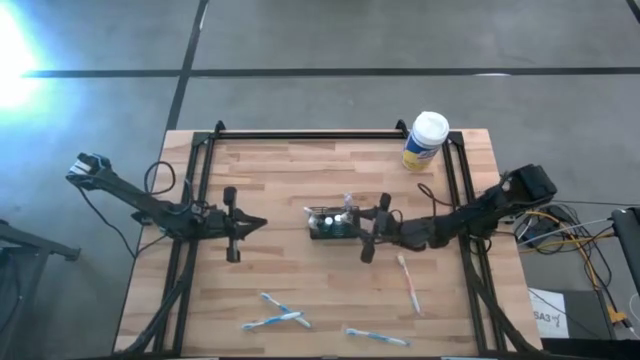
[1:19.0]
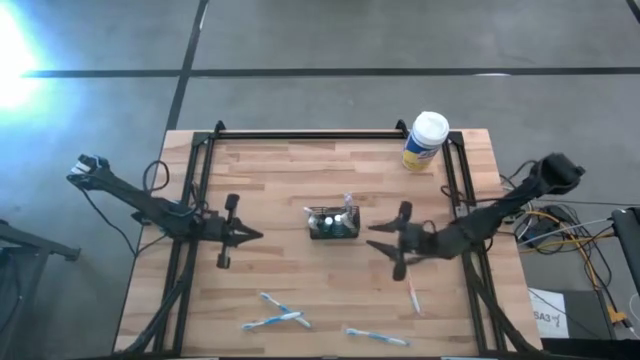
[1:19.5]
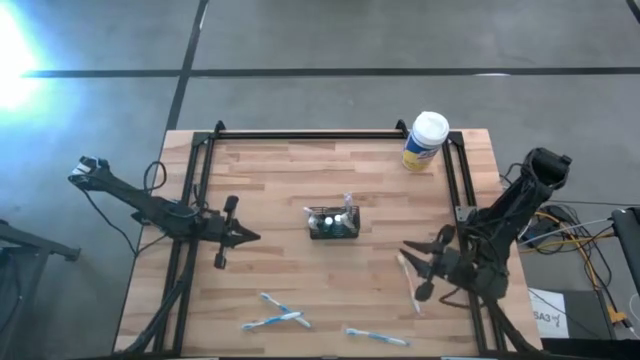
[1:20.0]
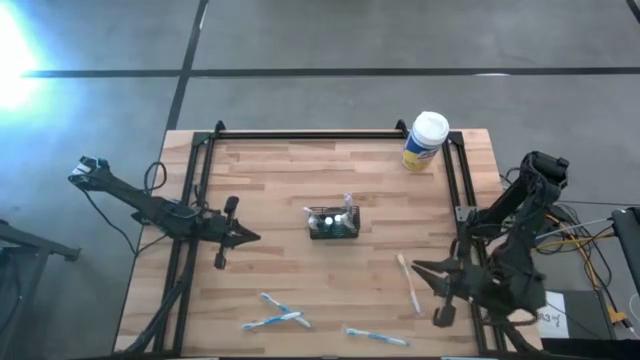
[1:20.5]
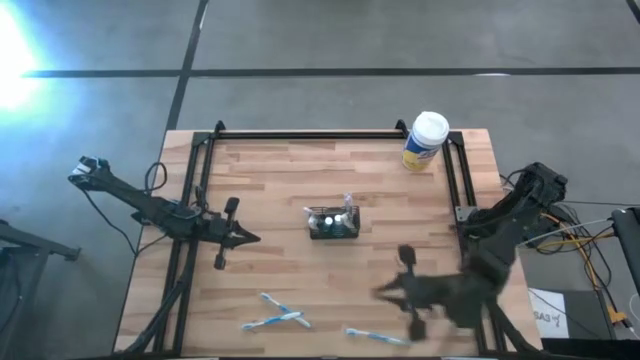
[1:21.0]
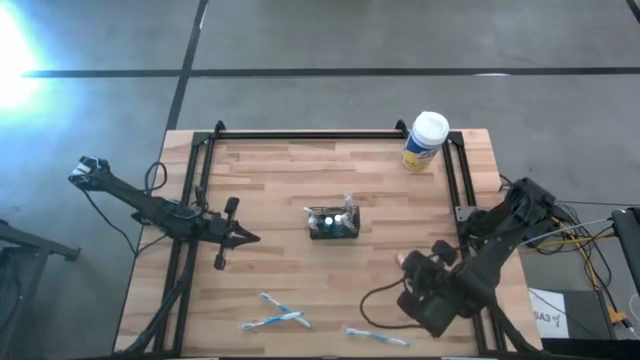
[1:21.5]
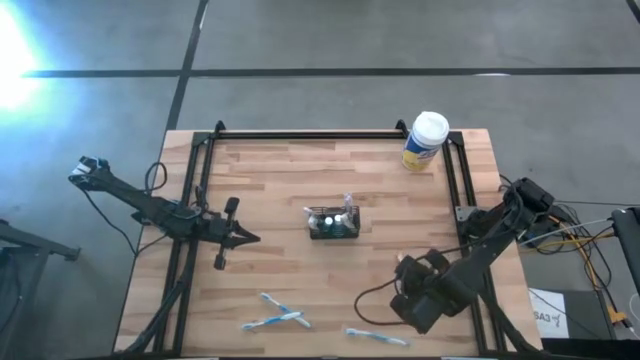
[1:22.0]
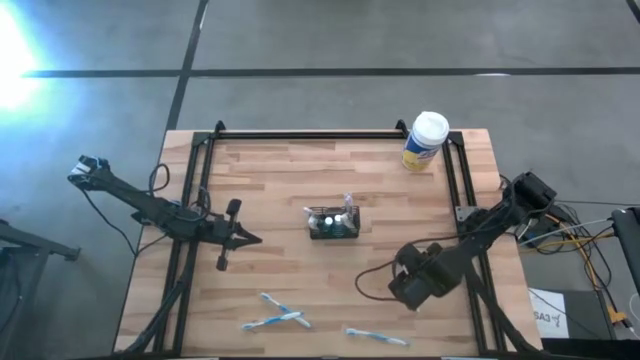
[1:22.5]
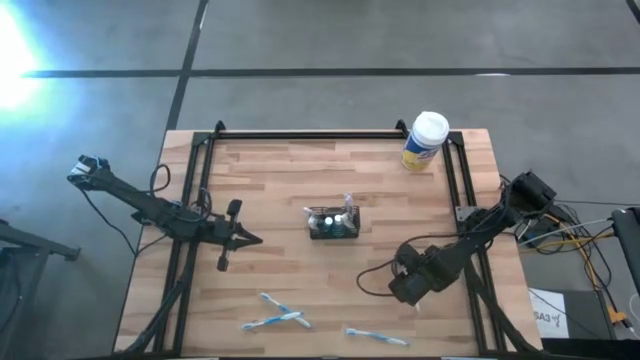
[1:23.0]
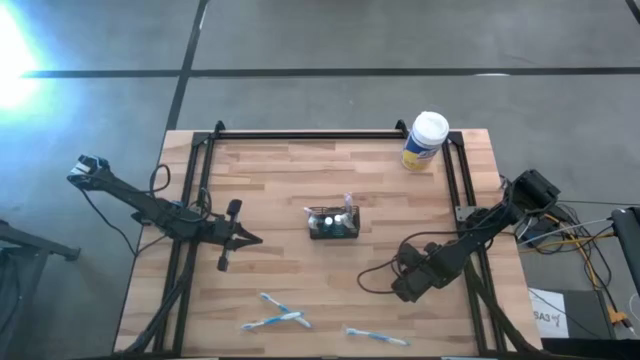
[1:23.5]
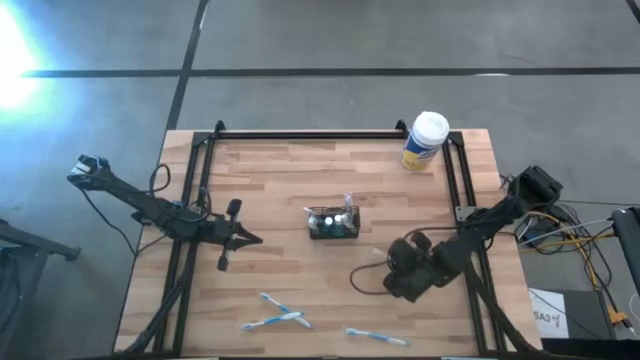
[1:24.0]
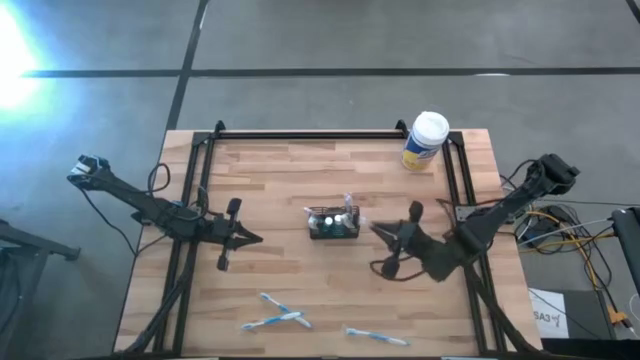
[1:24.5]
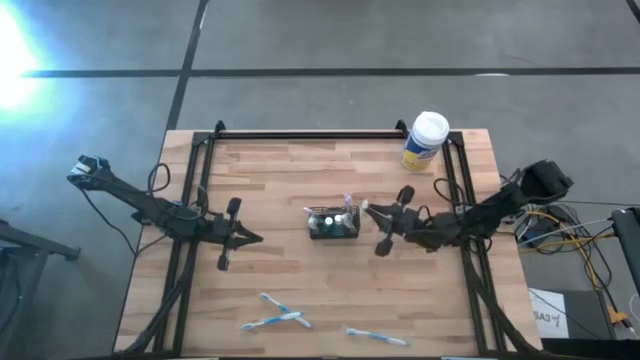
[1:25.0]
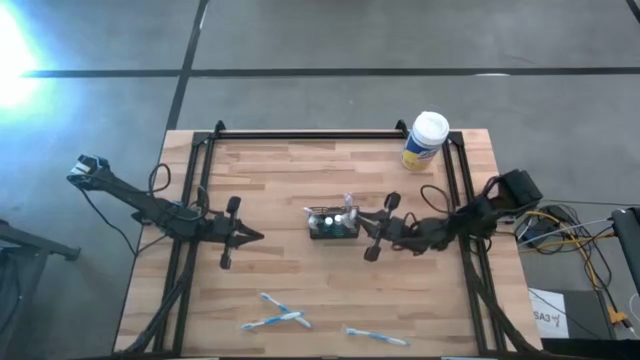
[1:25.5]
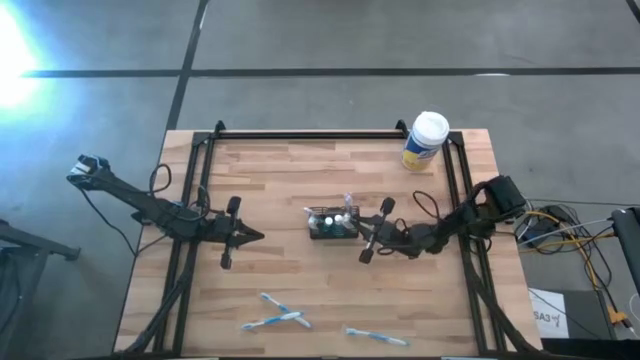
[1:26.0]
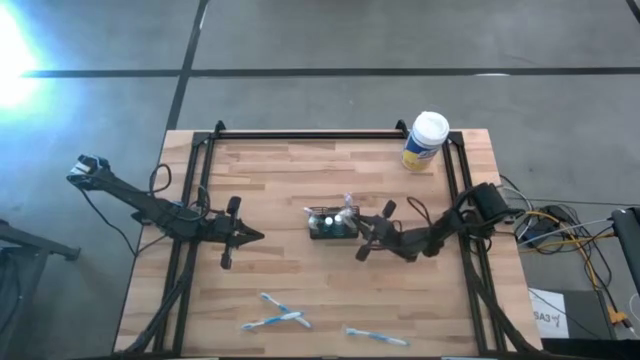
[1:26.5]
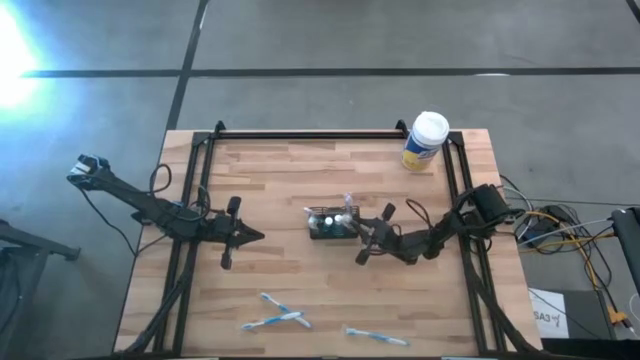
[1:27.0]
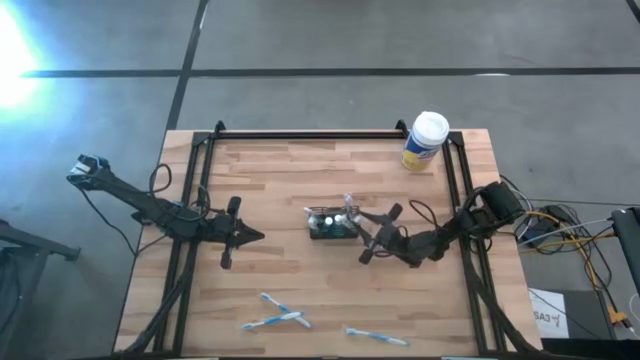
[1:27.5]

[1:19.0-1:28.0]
Task: Pick & Place toothbrushing station
Put the orange toothbrush into the black organizer

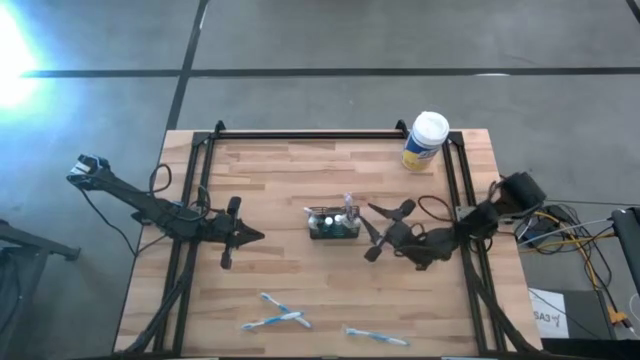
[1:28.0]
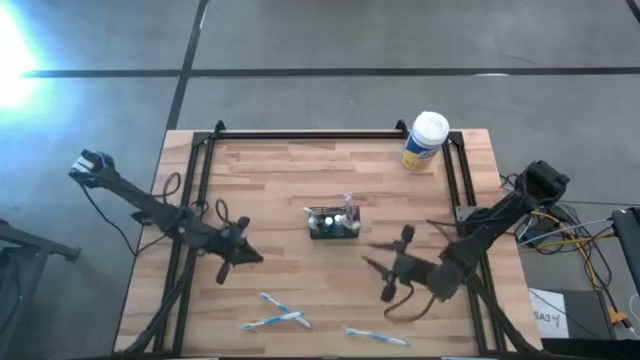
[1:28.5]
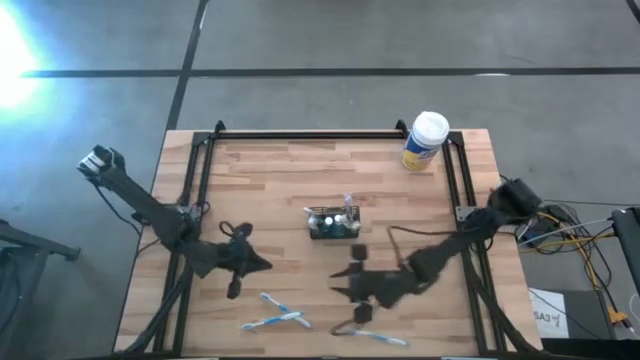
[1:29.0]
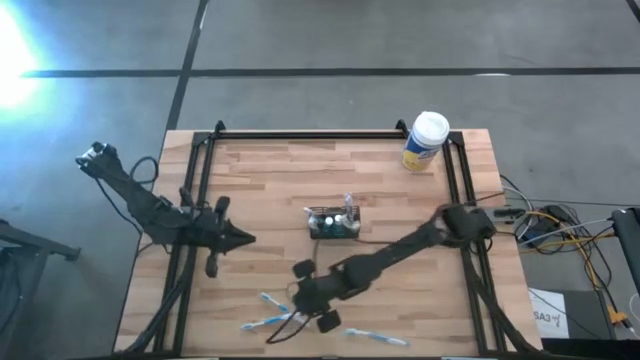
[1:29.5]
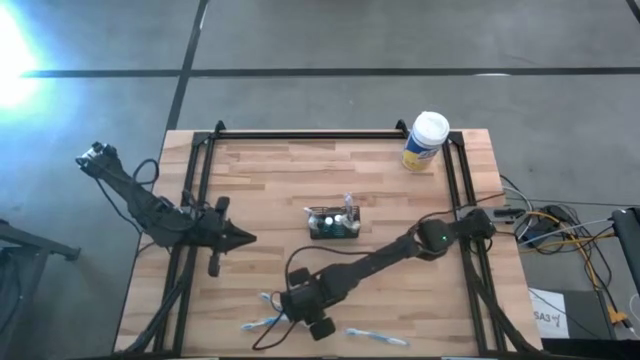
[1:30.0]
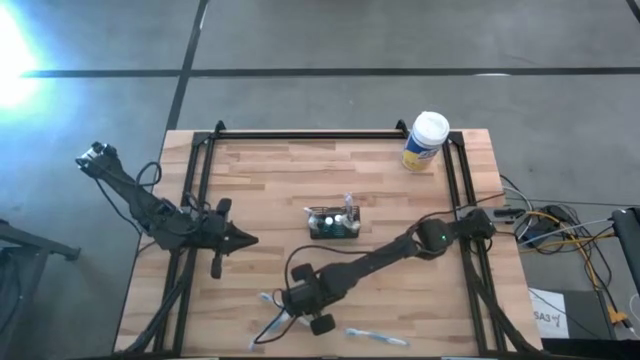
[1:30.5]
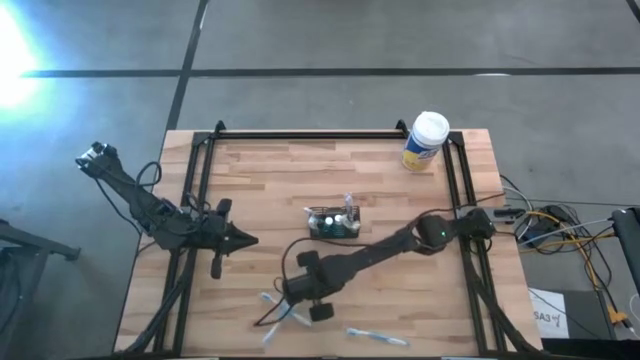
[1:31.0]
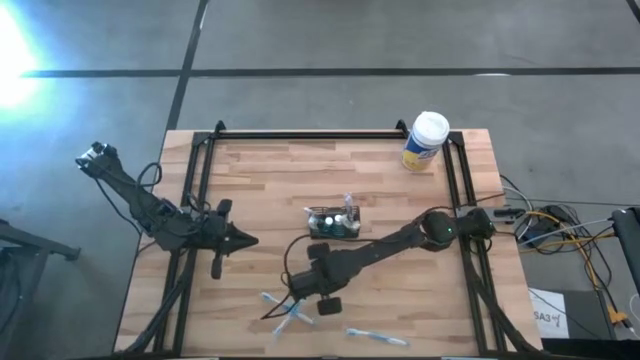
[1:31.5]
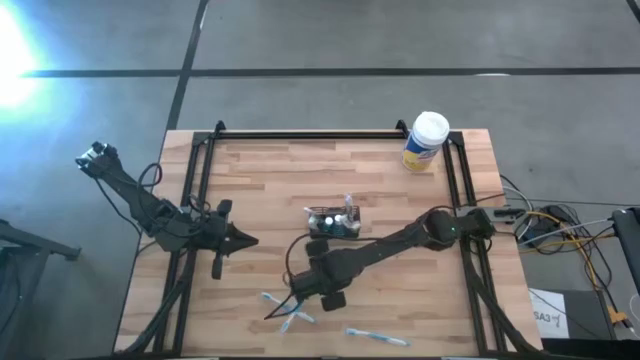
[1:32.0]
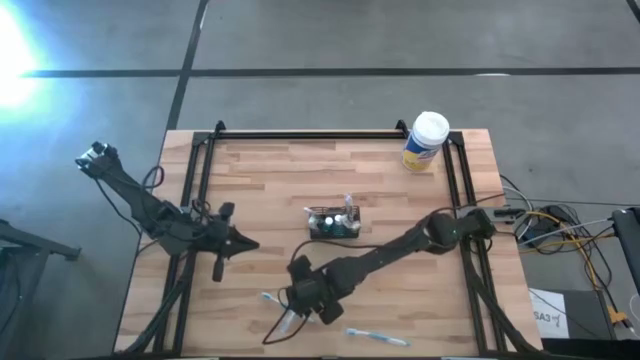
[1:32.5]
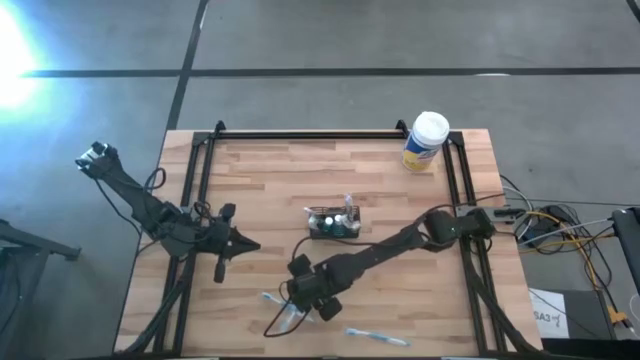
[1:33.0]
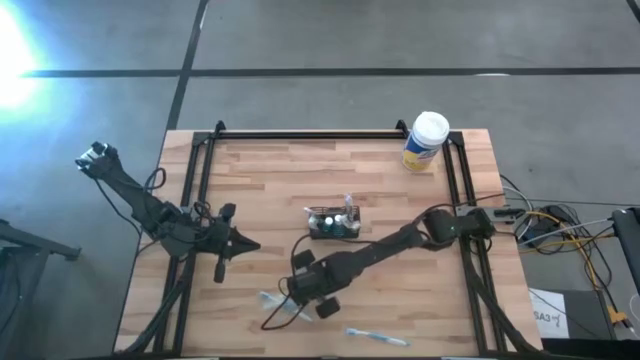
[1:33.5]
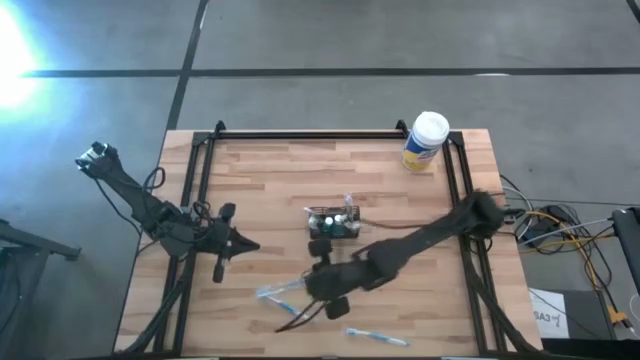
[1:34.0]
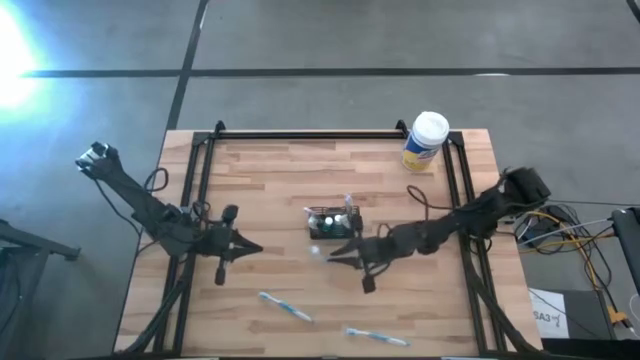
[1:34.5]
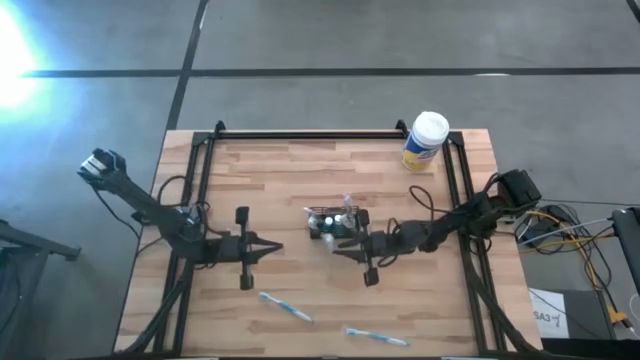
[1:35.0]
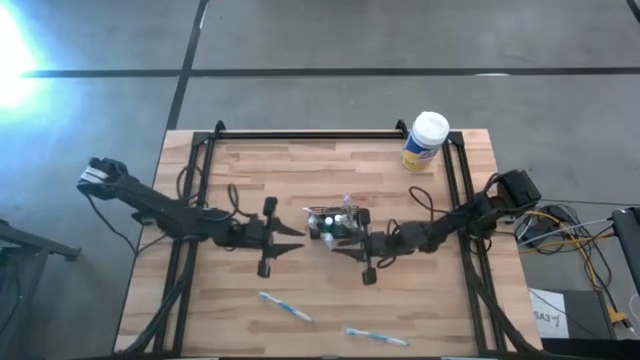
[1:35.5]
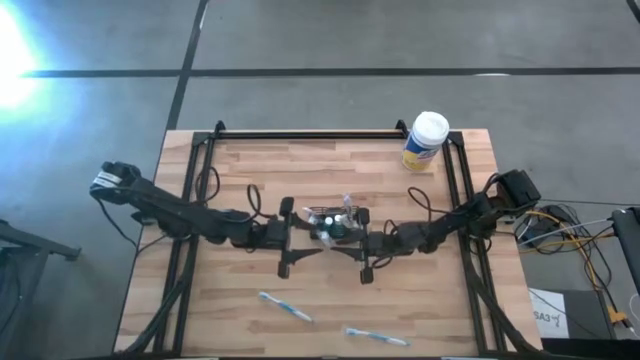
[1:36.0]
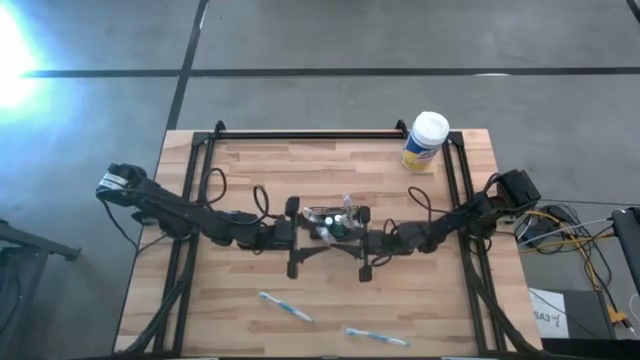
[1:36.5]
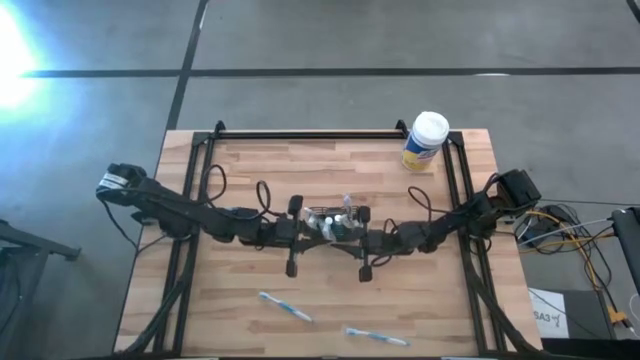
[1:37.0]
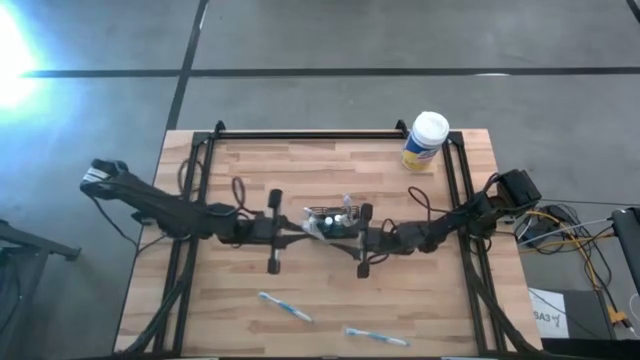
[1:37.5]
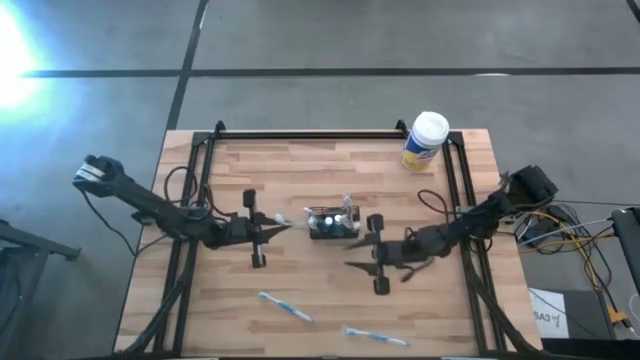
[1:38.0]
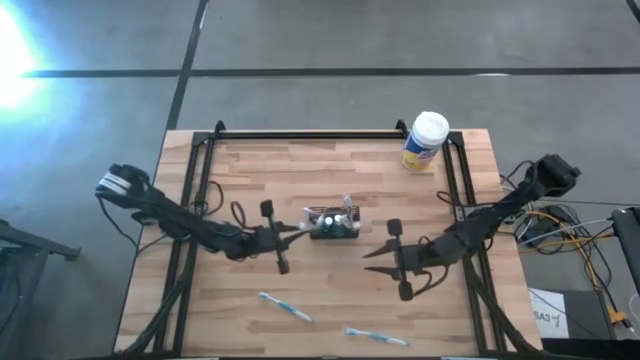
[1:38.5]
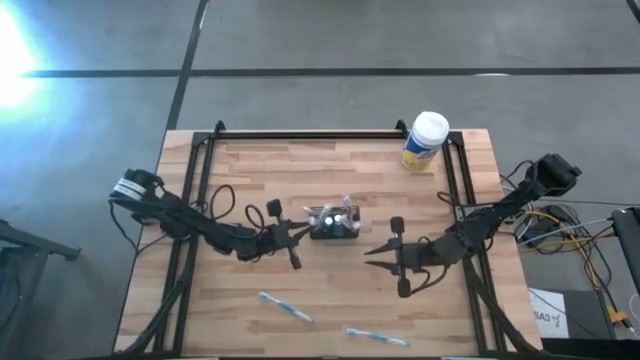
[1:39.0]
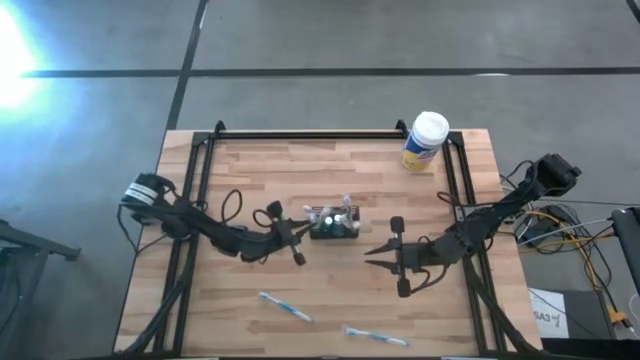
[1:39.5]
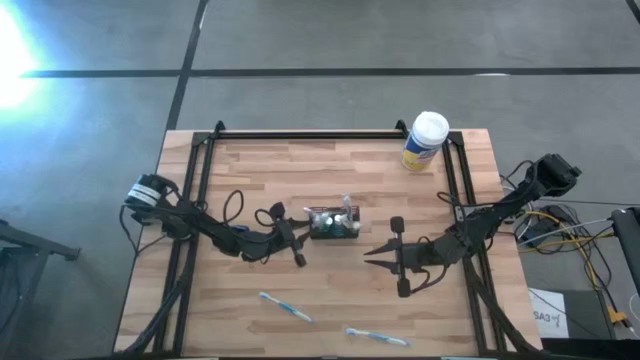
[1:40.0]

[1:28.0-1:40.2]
Put the left blue toothbrush into the black organizer
